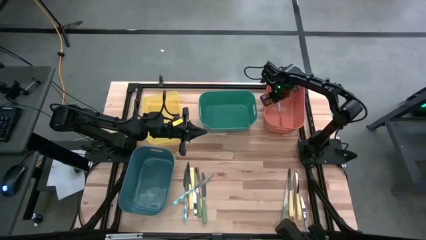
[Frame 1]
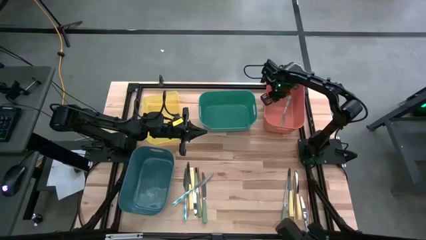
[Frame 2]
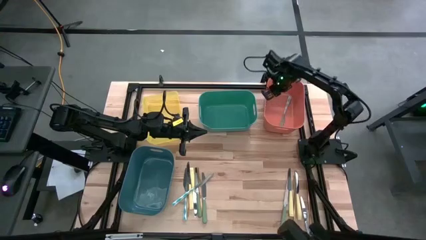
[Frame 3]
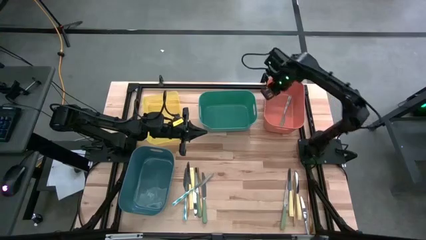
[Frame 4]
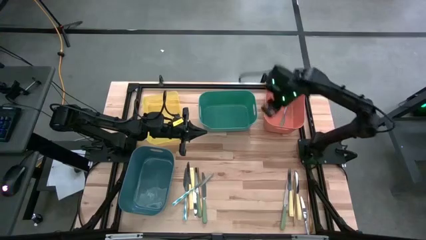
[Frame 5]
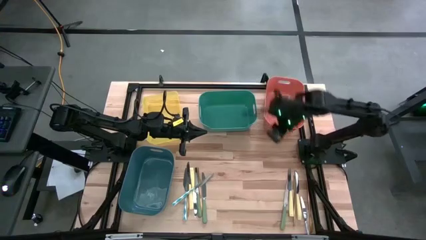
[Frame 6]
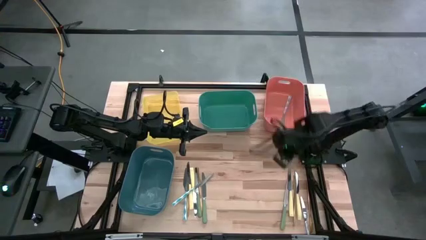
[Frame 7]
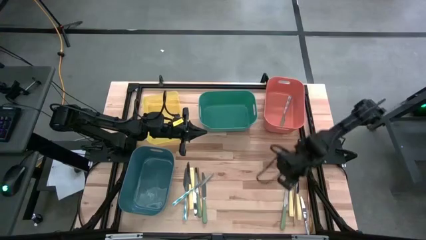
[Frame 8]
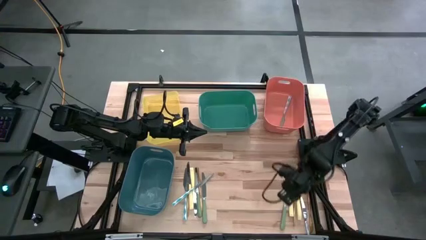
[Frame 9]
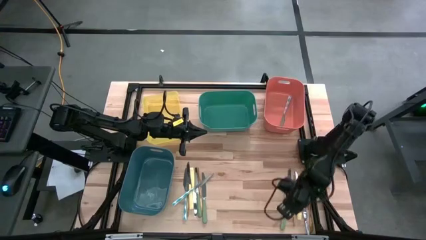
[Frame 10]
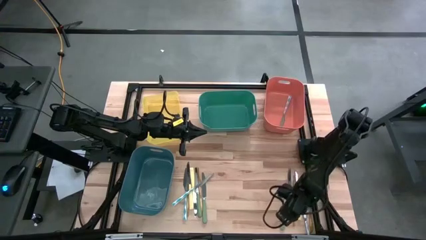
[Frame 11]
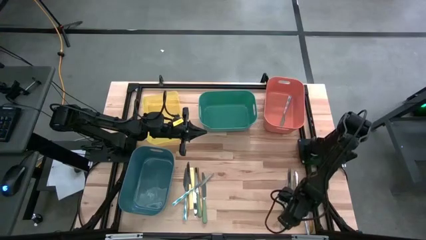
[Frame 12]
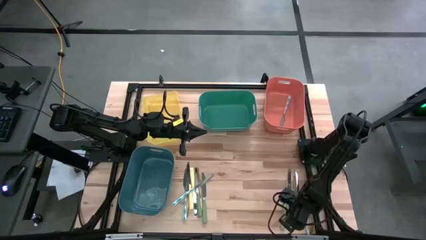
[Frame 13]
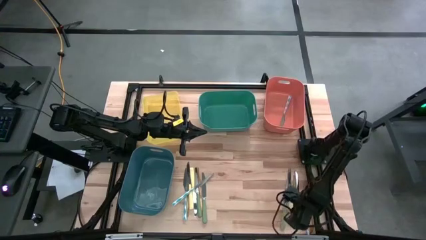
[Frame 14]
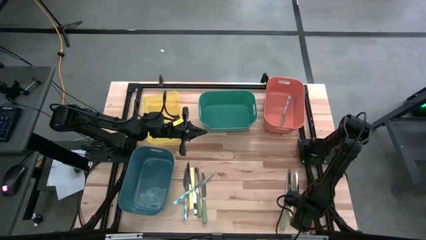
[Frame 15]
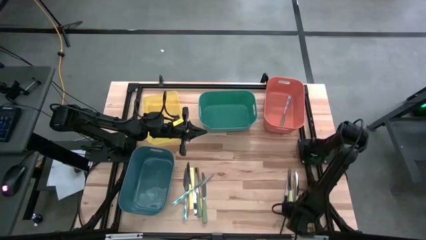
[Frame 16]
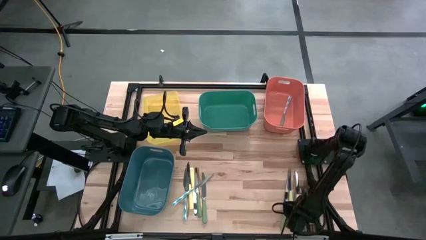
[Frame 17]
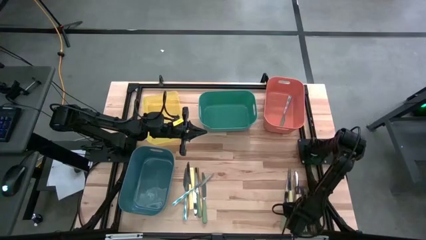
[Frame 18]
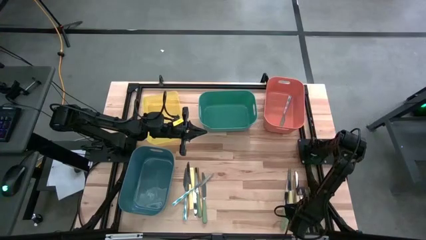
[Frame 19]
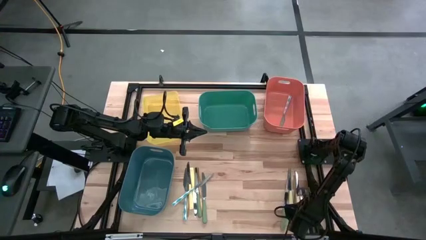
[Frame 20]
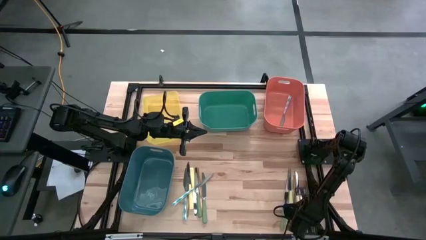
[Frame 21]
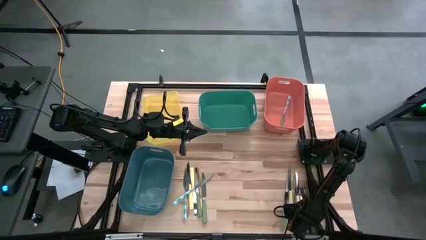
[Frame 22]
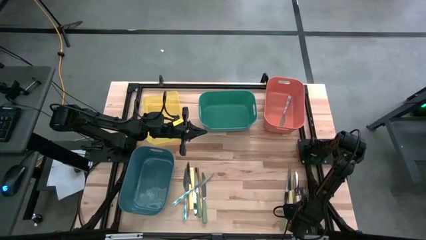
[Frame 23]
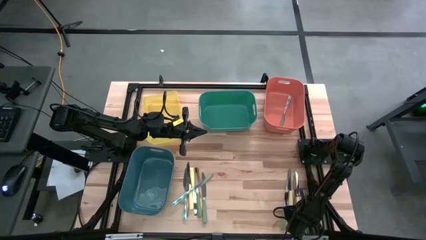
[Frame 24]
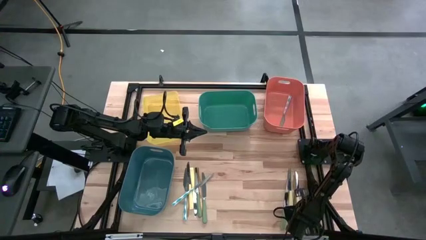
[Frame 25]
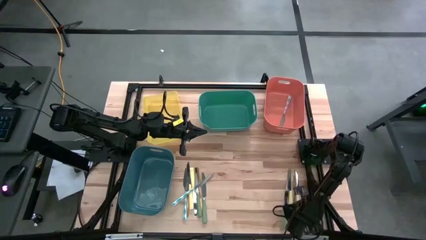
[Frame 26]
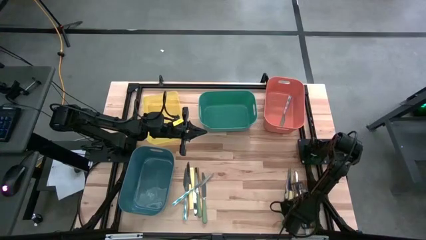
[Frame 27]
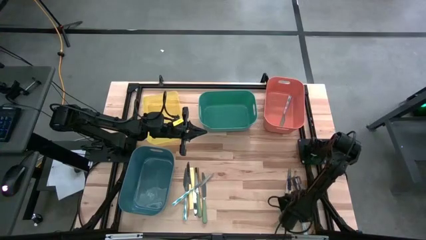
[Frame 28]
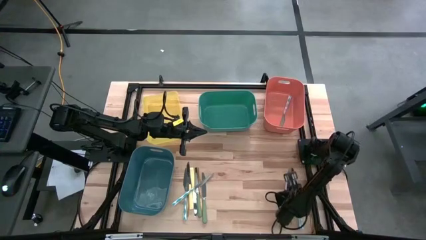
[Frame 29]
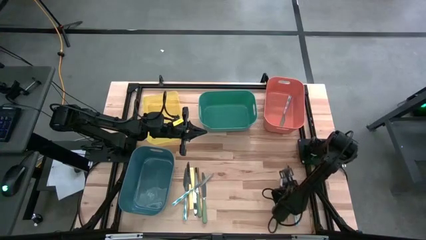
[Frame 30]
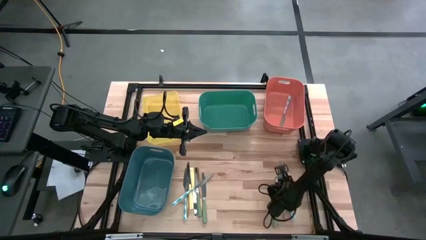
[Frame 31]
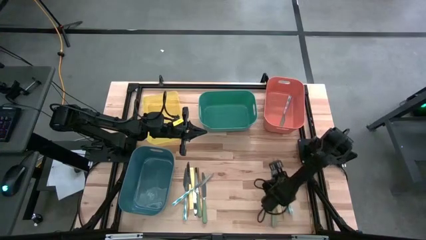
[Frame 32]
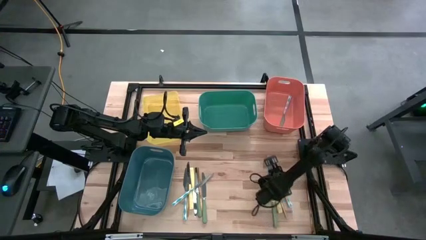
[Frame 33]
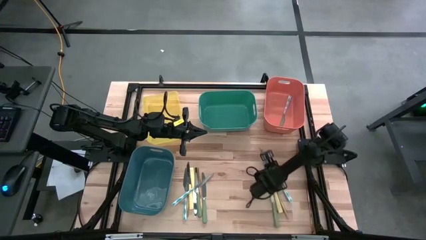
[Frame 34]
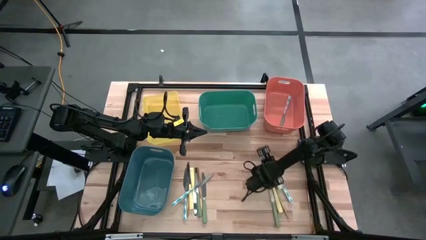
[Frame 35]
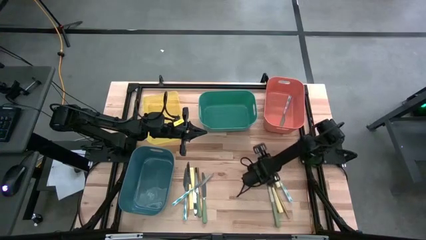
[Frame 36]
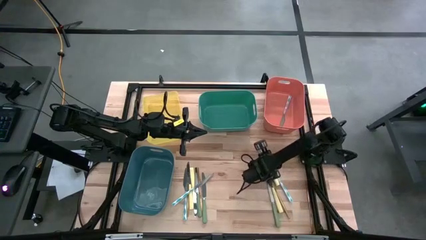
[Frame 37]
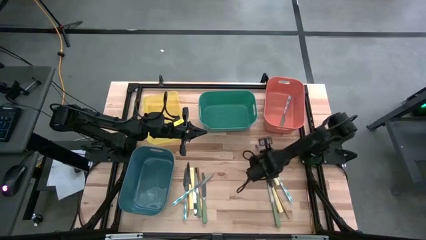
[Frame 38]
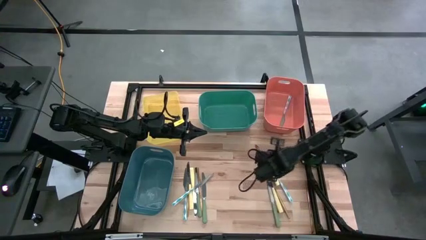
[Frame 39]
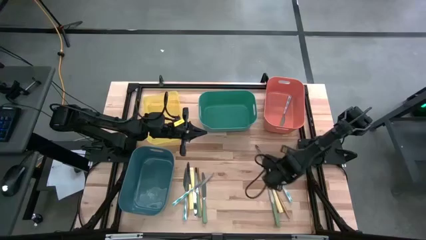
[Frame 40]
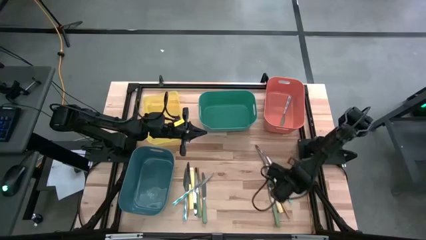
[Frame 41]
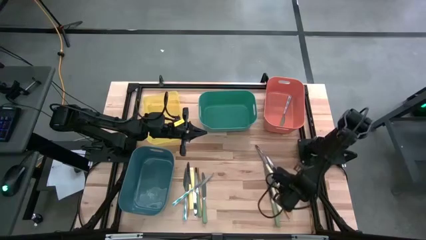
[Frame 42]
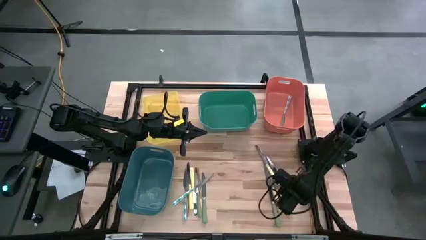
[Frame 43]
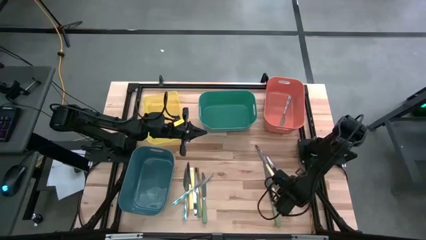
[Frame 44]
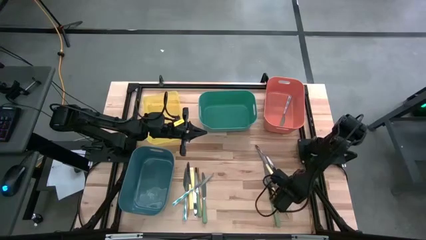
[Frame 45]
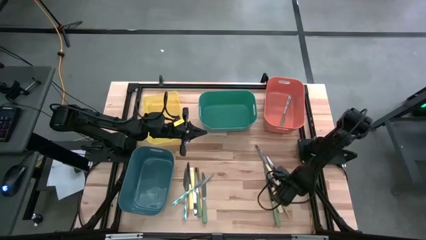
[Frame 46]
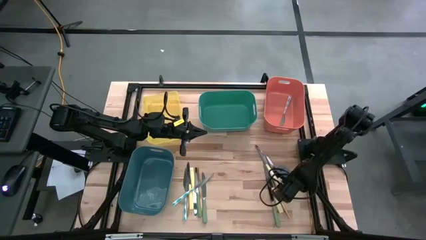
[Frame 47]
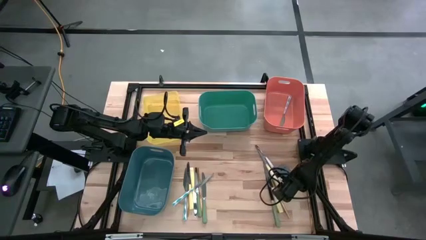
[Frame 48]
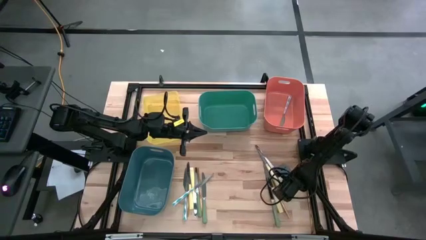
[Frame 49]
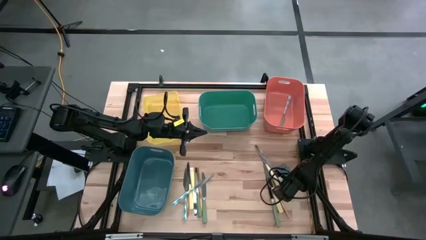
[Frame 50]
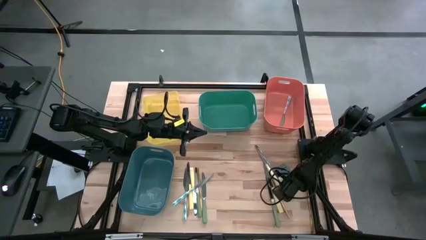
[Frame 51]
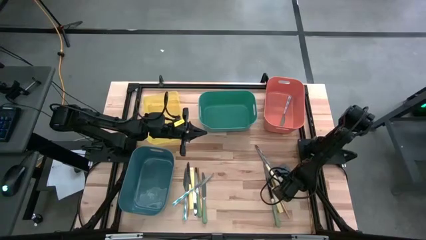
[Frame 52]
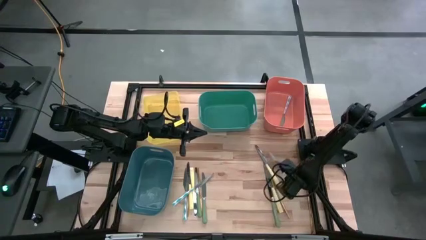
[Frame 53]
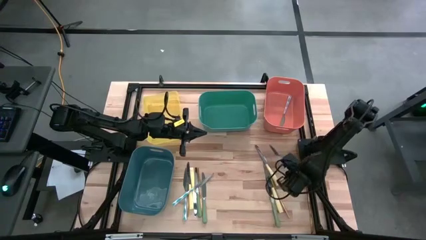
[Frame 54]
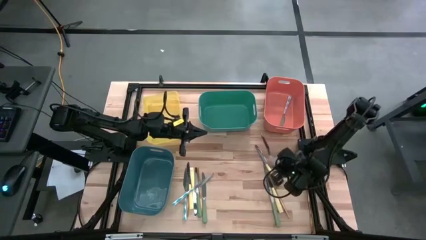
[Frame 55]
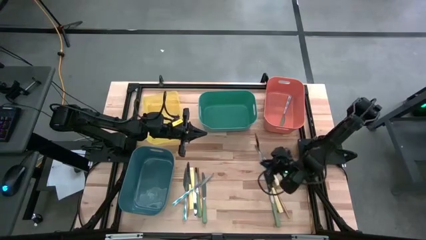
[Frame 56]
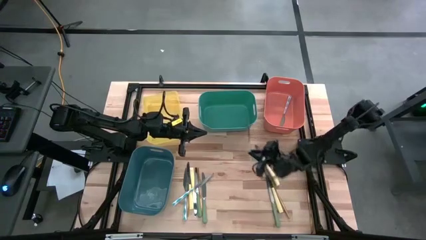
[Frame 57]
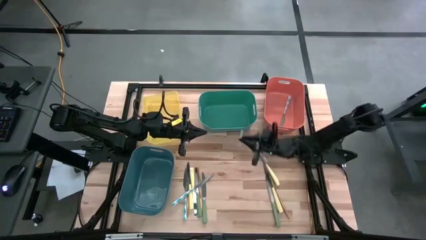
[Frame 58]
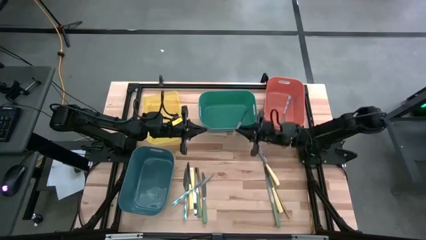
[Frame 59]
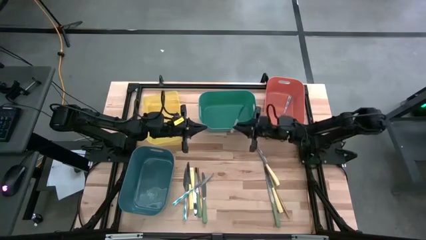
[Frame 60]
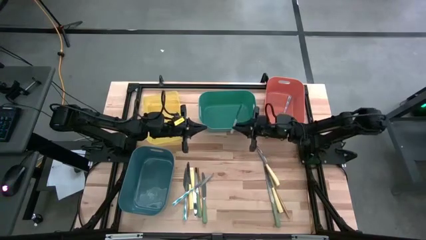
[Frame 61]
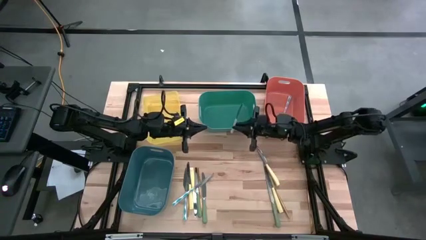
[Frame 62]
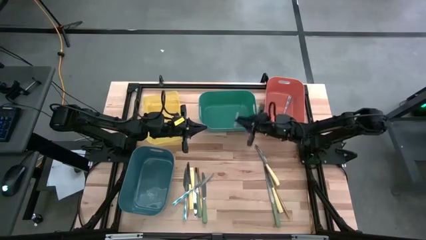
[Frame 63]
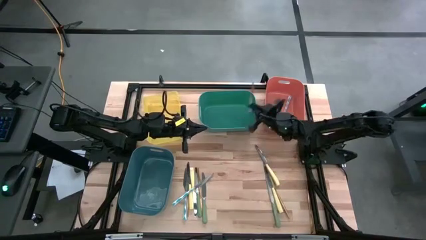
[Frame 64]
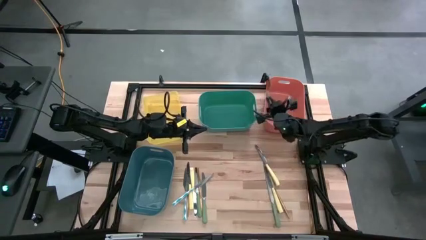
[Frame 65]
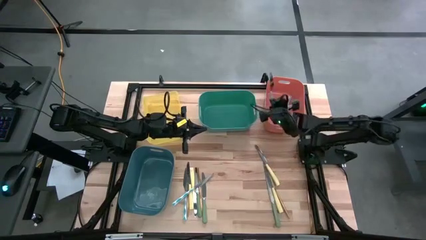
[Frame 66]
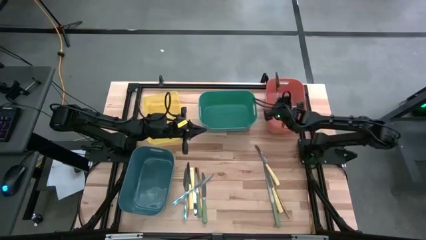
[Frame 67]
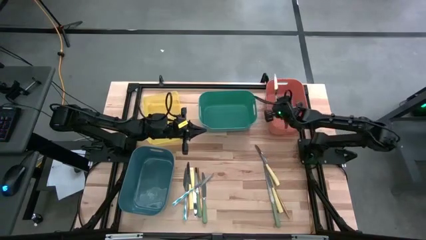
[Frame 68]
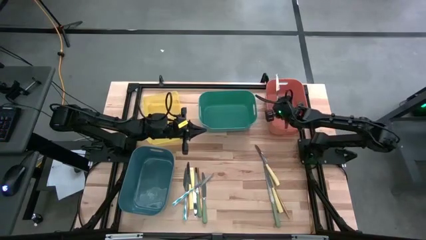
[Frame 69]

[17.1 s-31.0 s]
Task: Sort silverware by color (type)
Put the blue patterned knife into the orange bin
